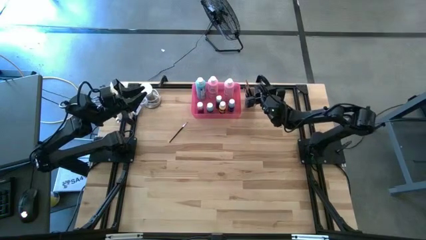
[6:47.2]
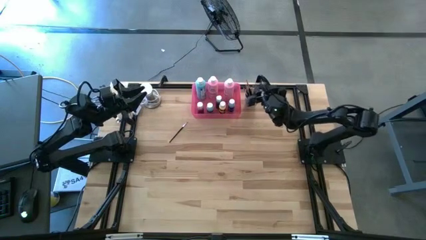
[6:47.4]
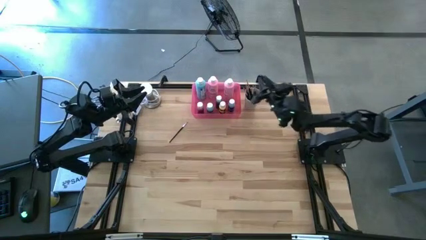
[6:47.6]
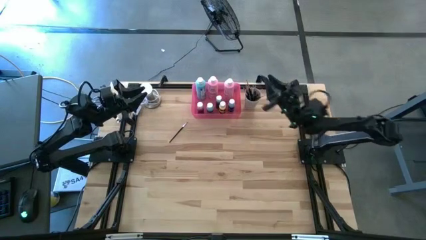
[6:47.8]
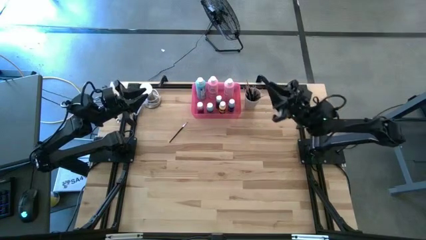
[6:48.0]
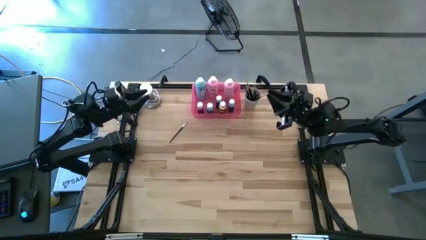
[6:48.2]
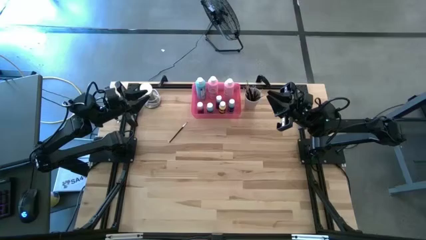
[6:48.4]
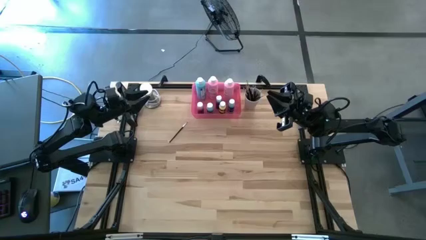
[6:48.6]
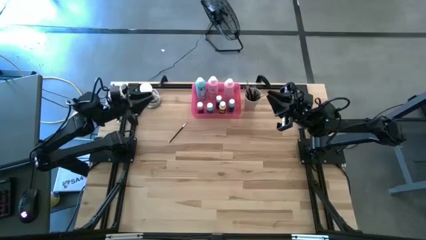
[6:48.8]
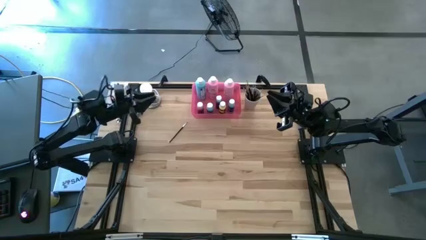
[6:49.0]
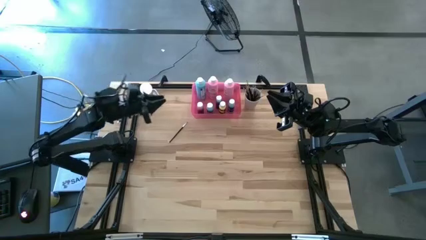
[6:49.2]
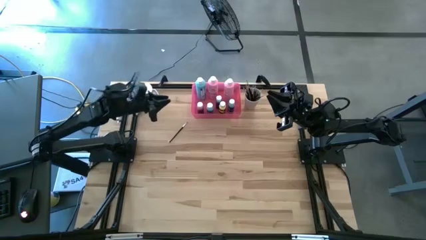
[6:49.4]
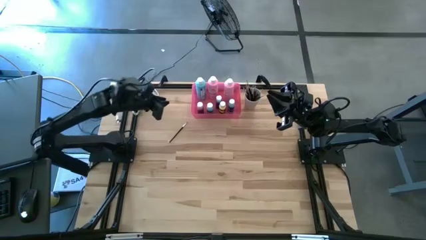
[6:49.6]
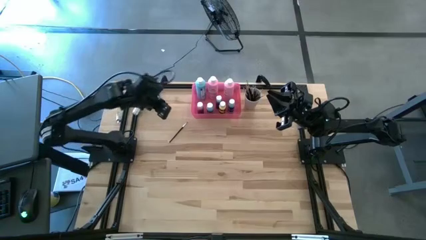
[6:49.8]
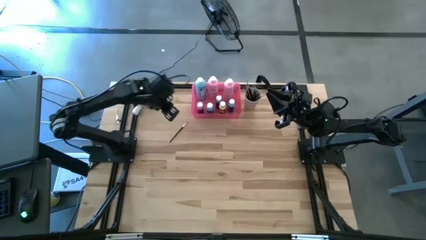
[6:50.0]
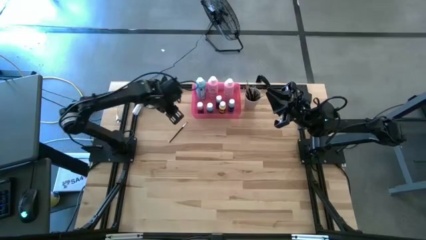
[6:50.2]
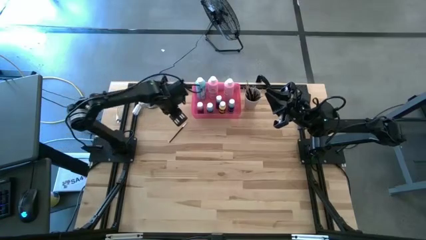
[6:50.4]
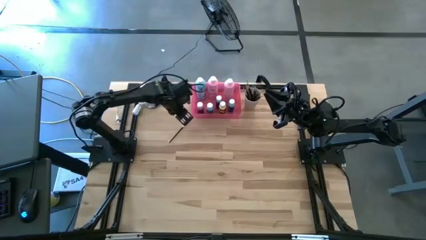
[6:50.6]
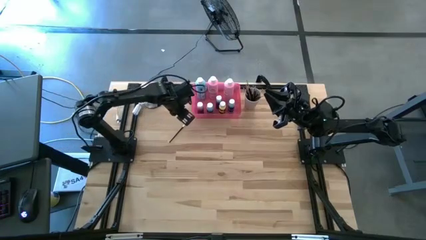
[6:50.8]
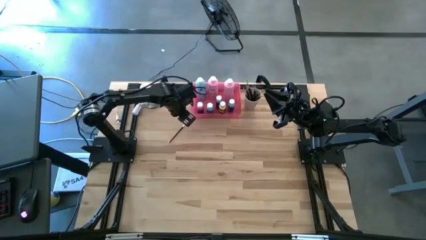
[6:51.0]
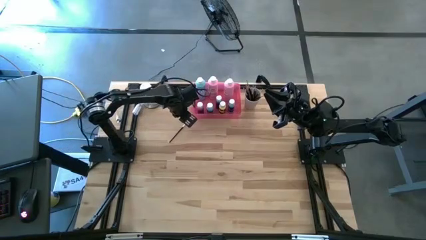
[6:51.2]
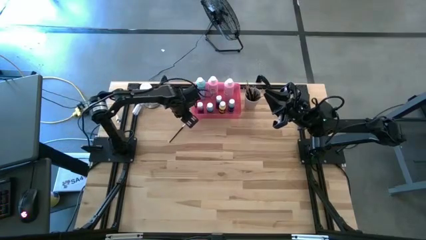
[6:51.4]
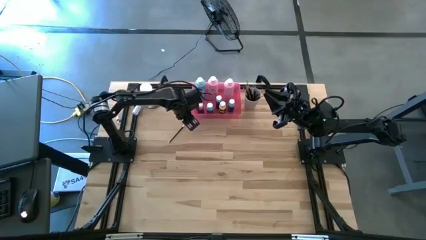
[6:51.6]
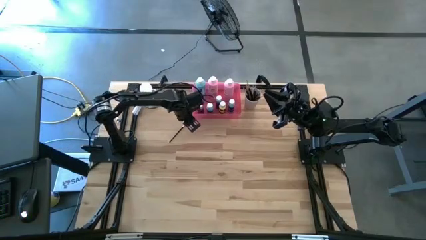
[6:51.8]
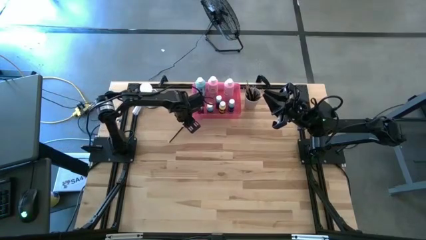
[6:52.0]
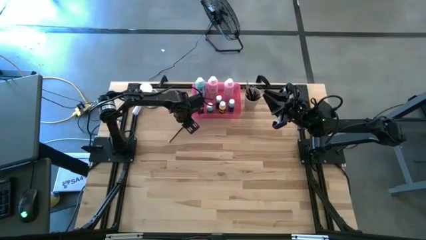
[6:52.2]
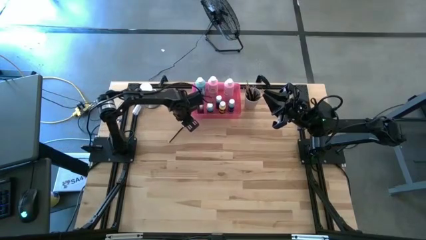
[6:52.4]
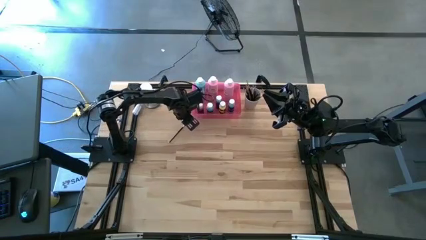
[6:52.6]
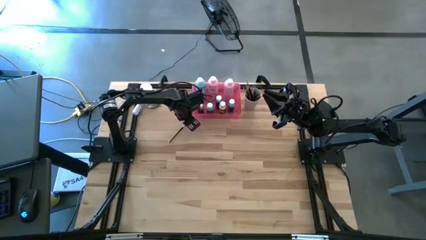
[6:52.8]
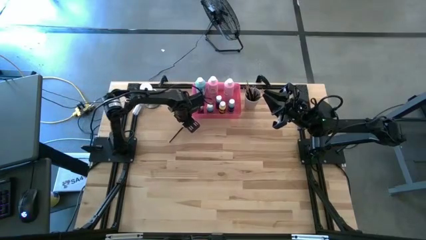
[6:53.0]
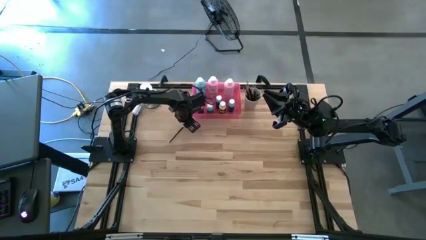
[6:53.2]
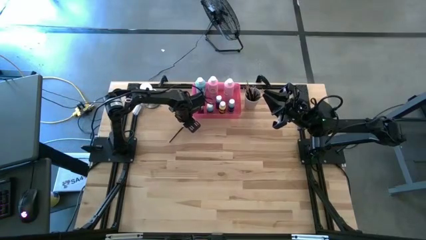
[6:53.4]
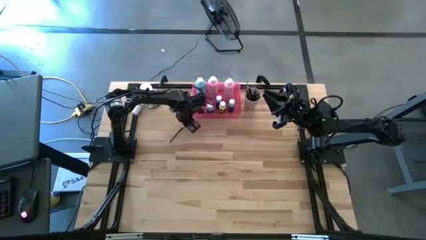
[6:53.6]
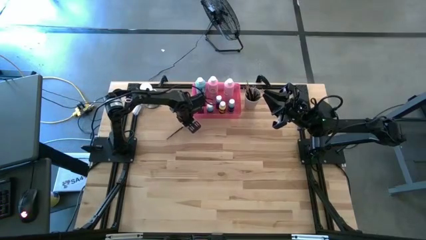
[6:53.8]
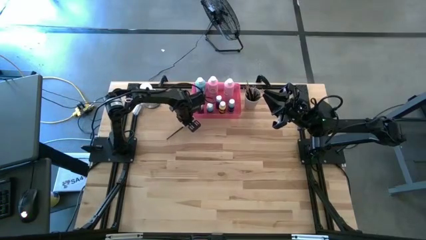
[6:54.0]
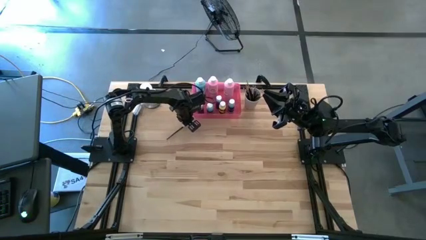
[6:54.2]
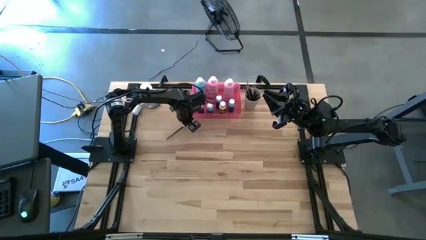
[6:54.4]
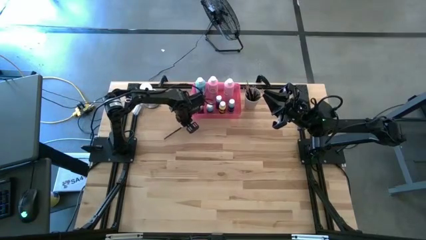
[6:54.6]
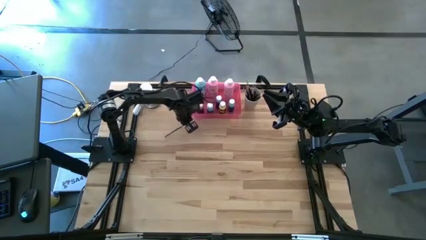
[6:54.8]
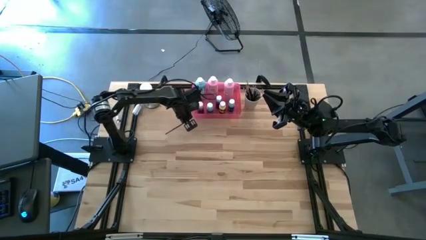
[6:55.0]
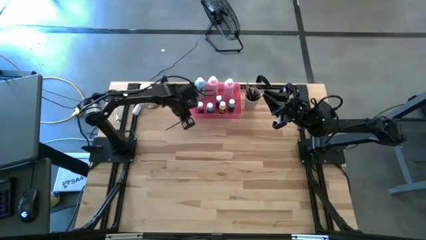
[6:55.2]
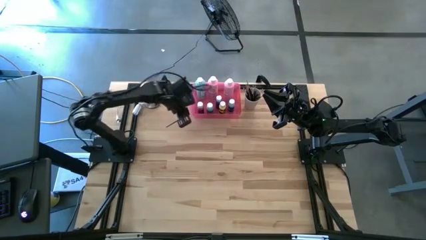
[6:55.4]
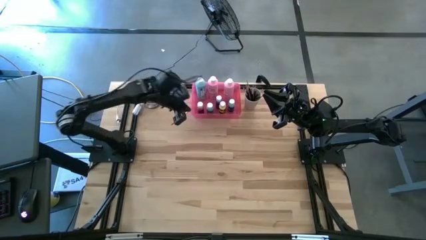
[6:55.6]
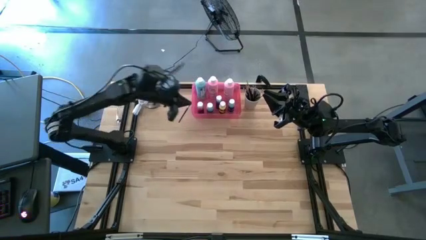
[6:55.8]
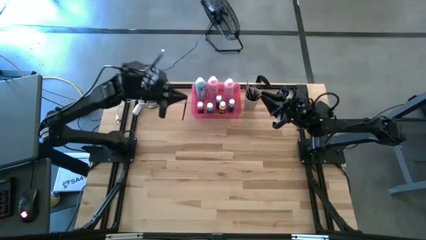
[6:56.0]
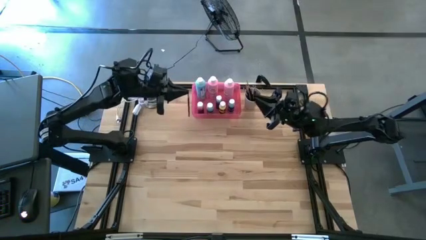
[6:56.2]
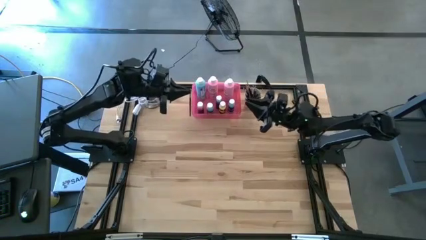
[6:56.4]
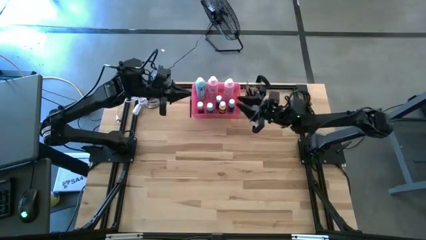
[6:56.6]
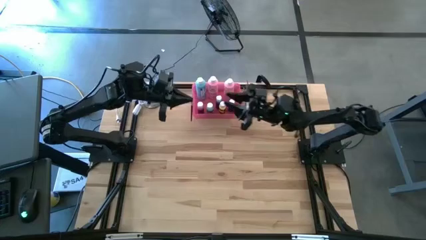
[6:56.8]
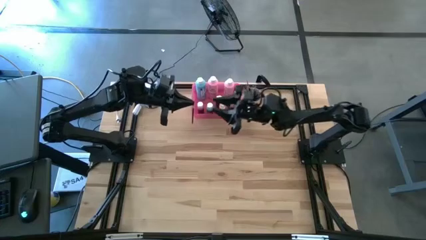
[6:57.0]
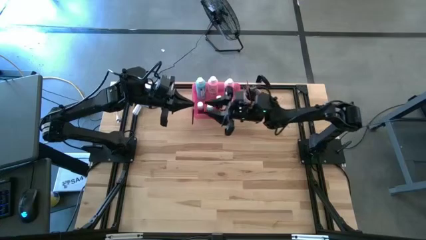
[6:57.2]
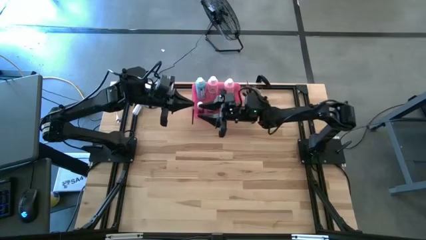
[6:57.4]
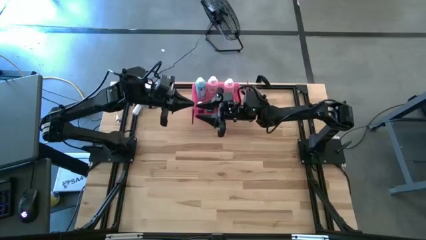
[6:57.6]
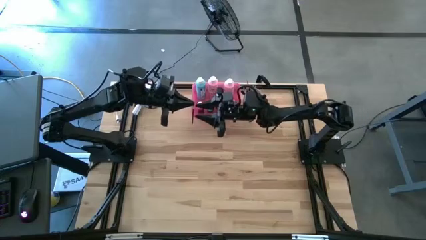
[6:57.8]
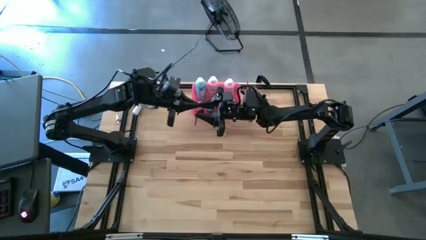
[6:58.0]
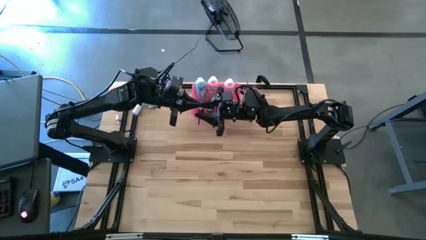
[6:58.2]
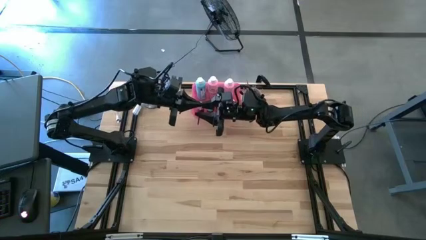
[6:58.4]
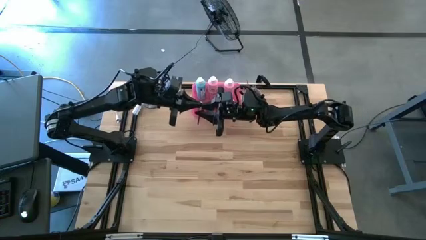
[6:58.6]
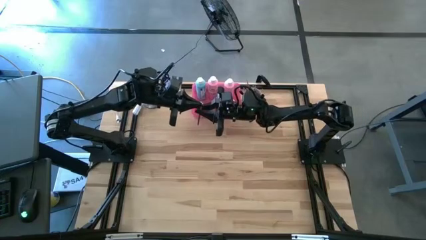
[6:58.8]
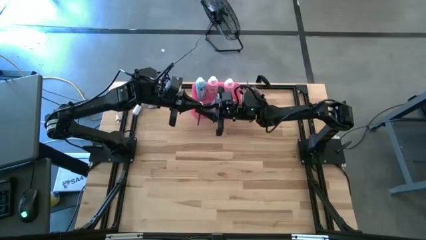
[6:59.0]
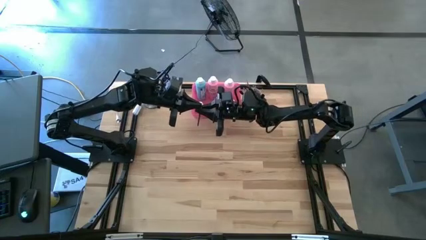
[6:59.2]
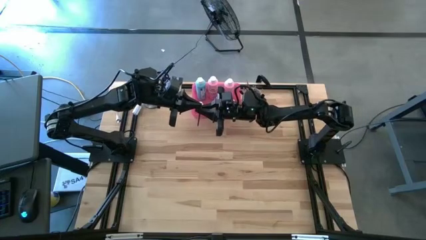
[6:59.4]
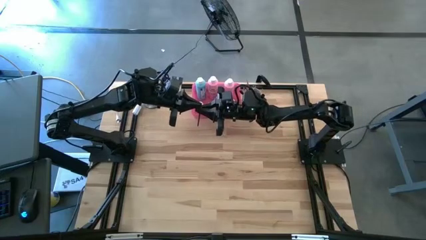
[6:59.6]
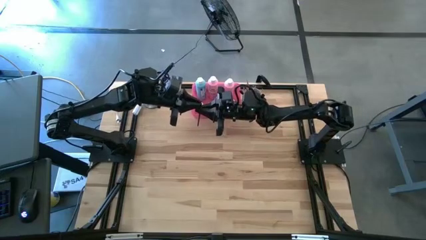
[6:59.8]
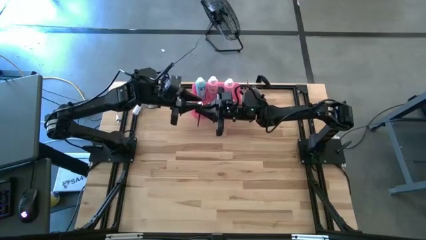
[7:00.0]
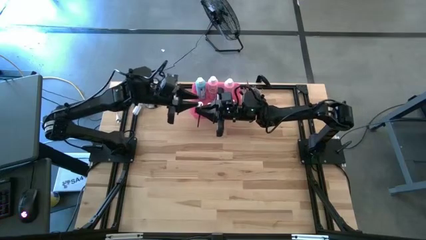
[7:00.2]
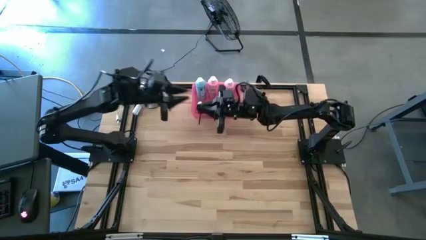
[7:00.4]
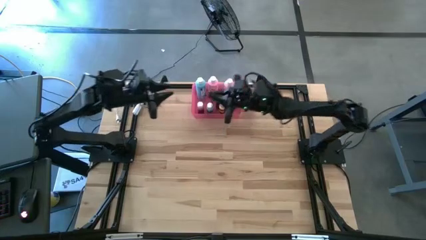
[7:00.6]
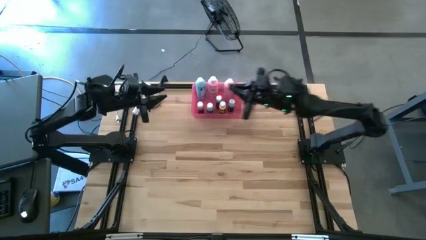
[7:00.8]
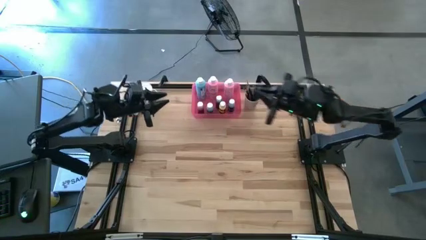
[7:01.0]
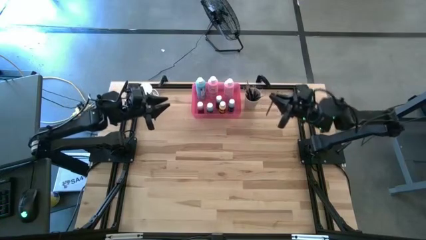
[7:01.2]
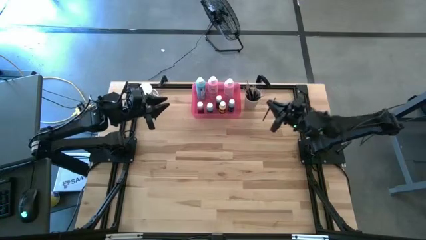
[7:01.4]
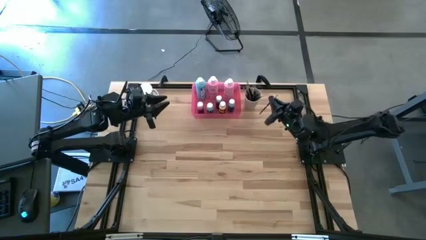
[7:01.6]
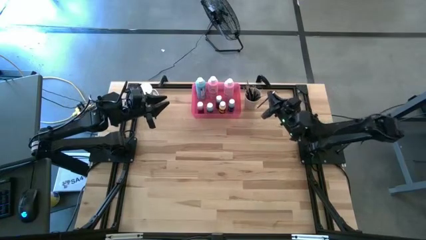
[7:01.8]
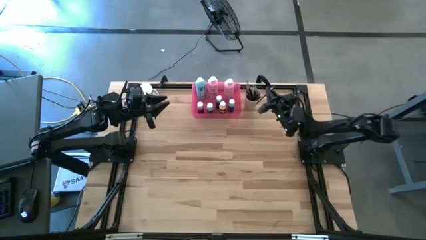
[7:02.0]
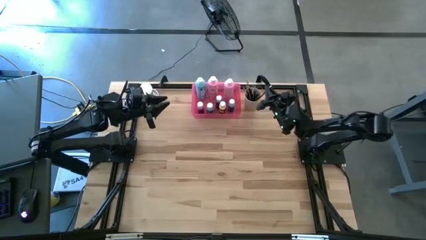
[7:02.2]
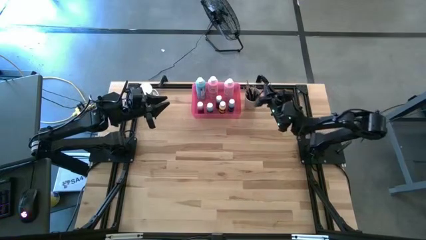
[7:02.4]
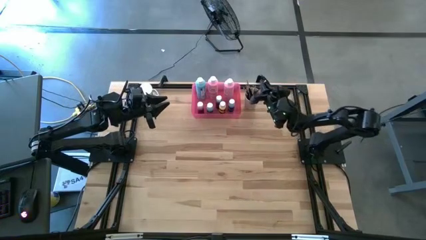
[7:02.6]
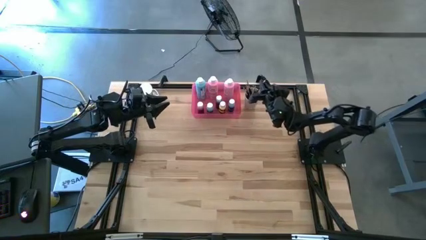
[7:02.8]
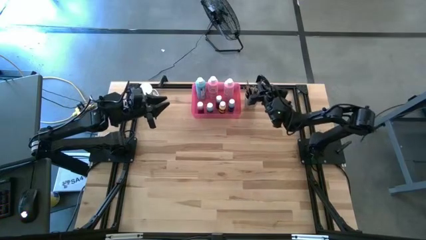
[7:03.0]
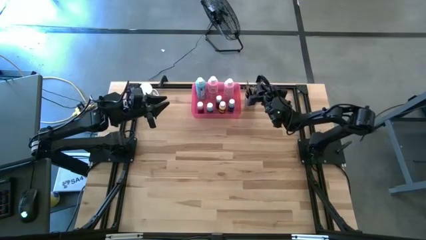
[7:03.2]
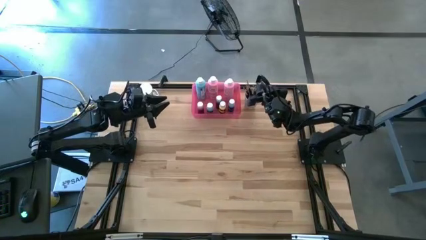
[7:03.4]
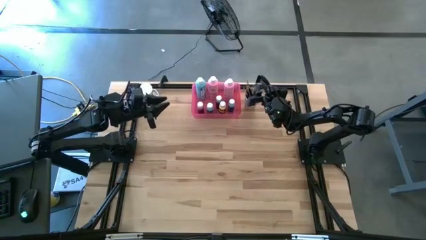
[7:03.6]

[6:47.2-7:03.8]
Task: Pick & Place Paint Supplies
Put the silver paintbrush into the white cup
